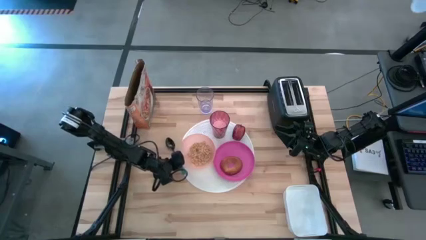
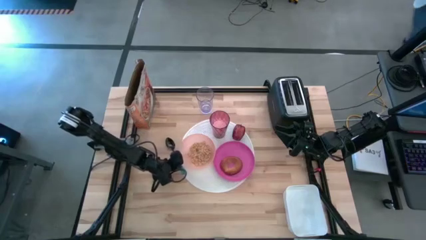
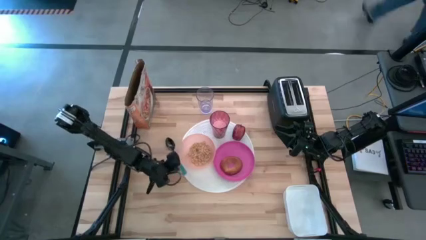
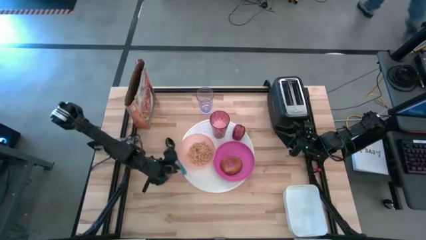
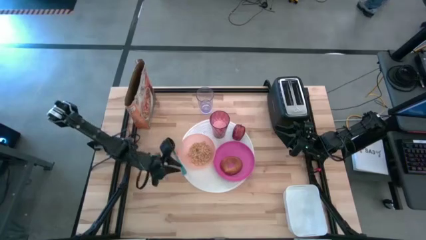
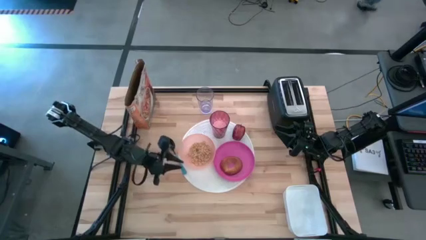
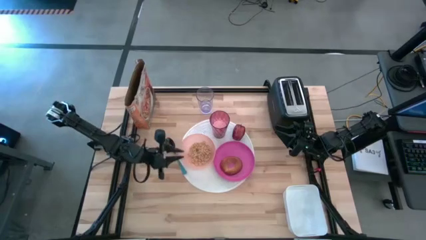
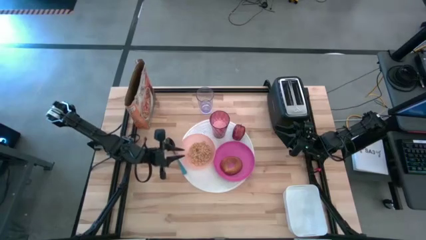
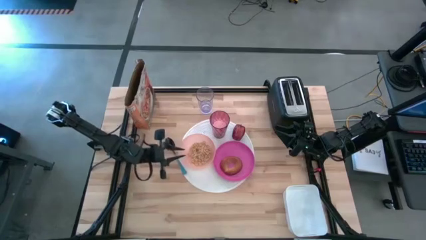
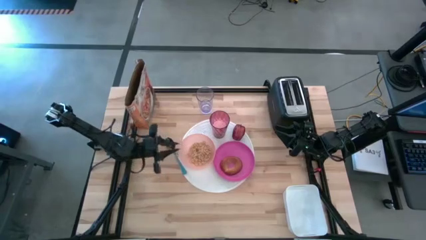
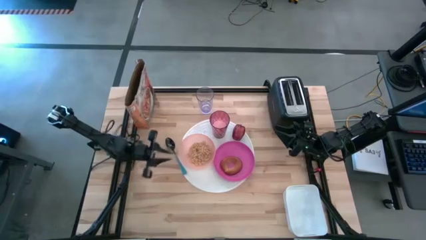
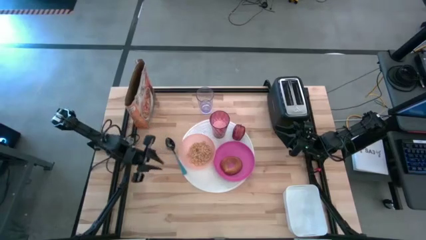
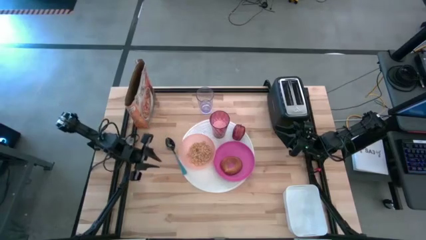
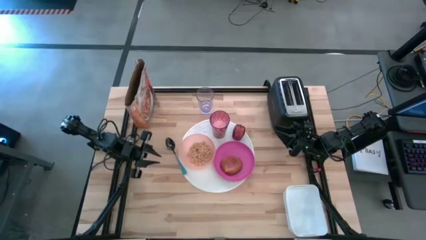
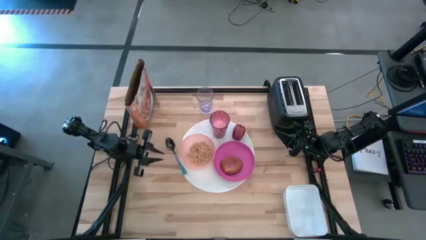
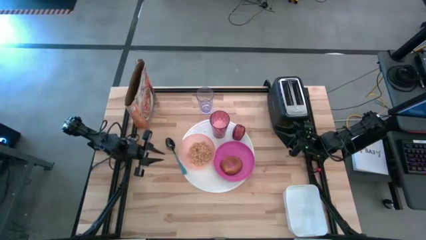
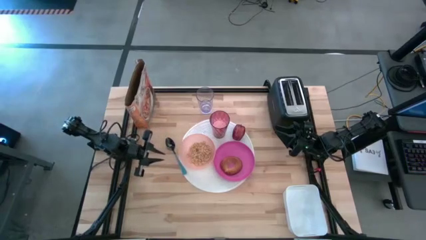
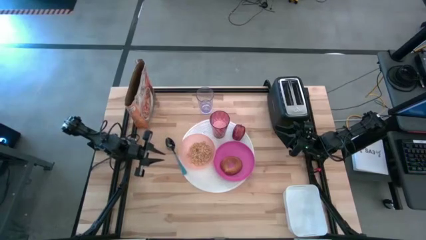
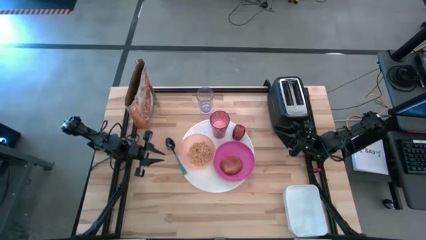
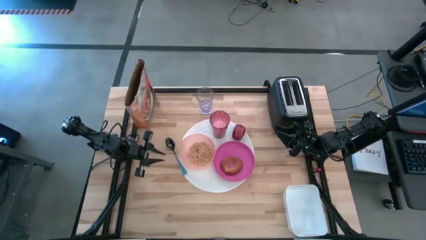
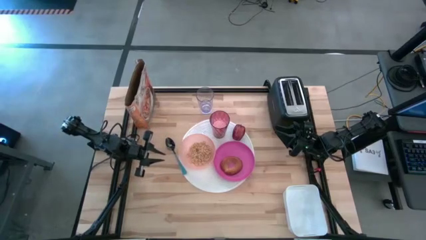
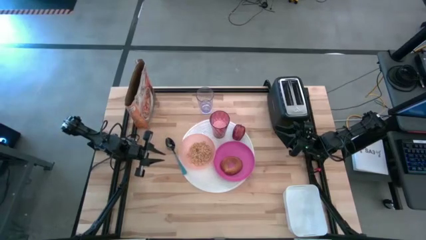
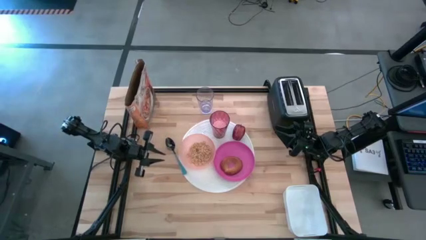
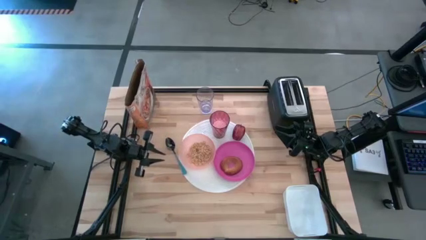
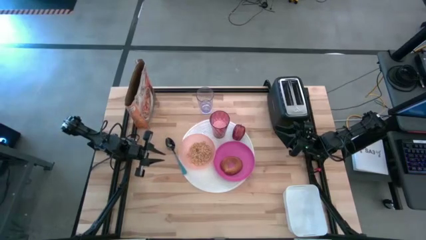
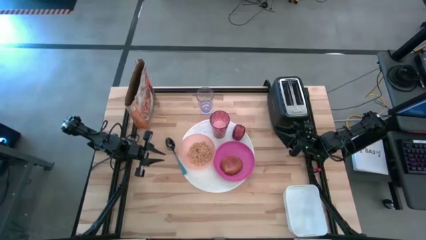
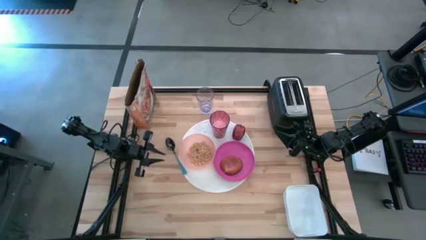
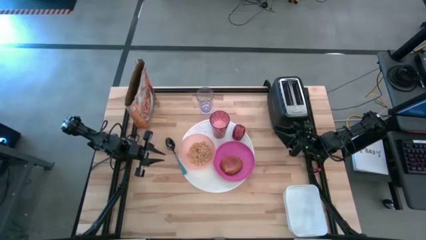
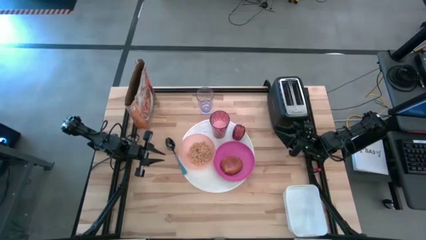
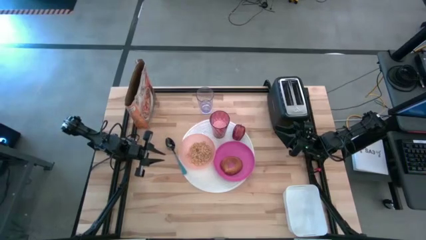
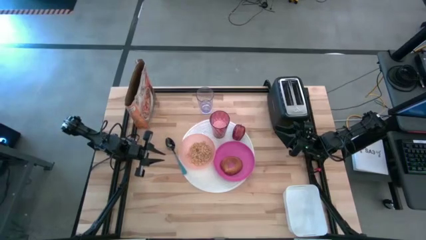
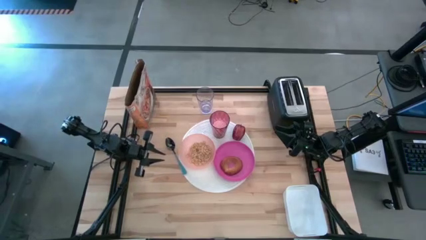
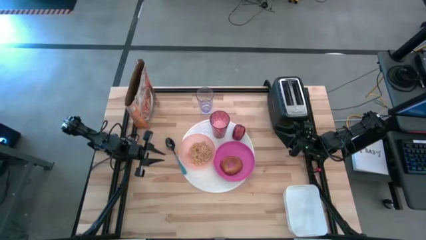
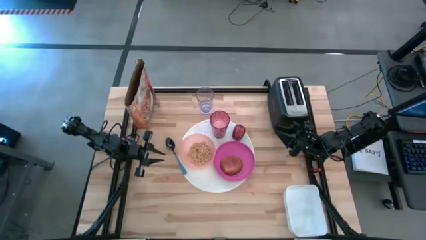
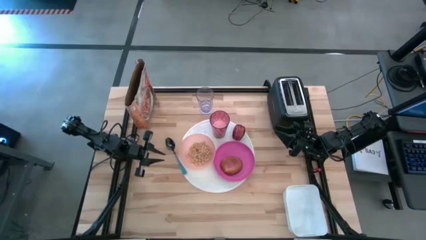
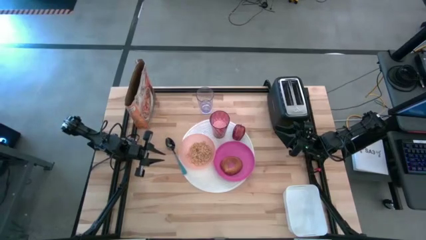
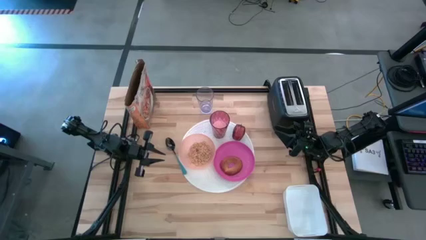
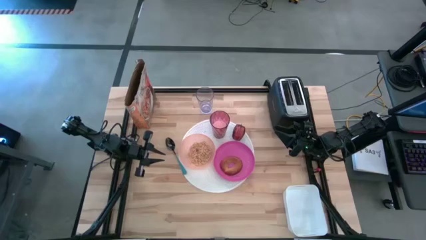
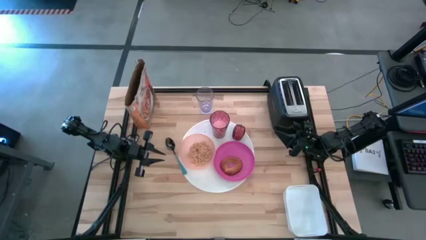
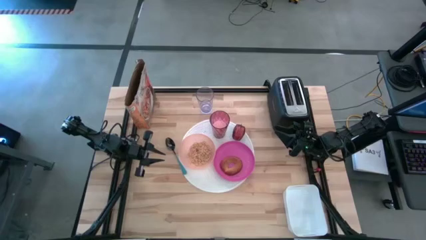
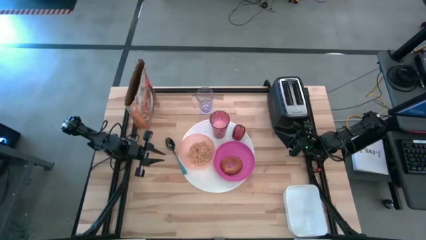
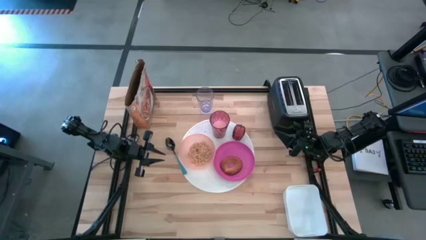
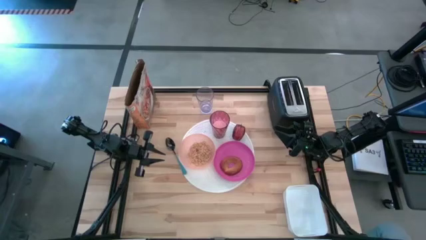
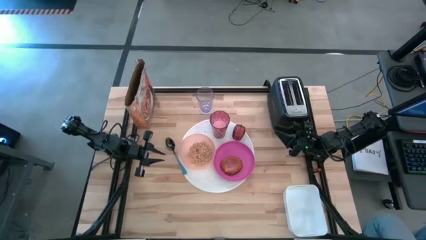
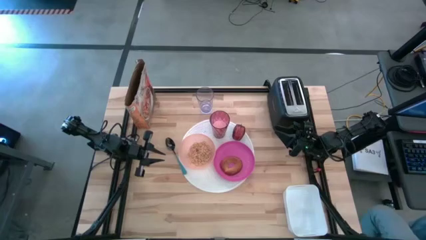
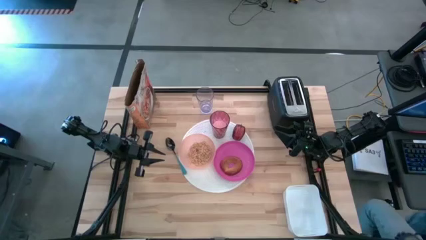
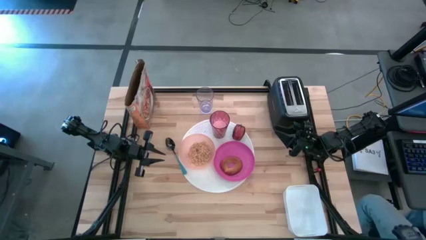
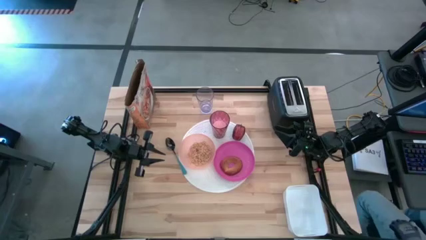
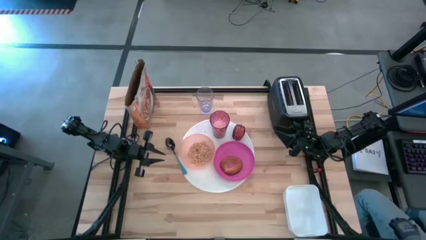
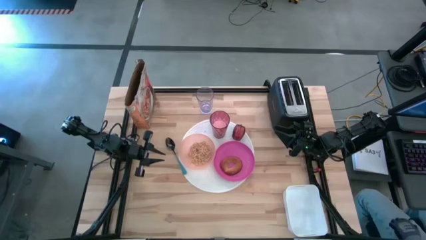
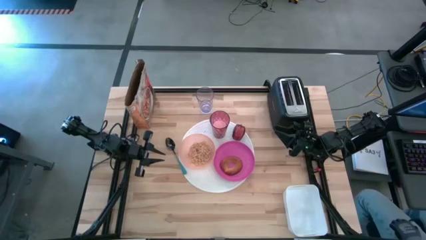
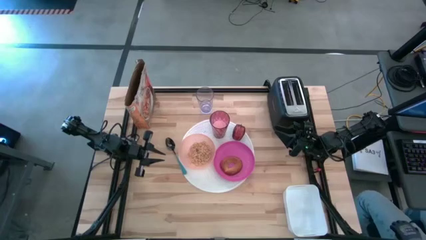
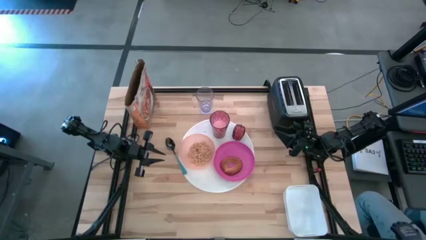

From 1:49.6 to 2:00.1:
Task: Arrange a breakfast setting
Return to Home Position

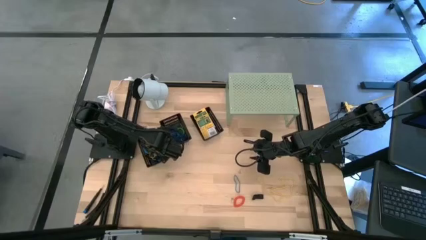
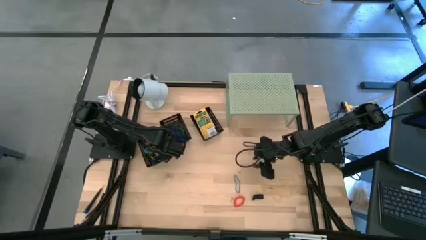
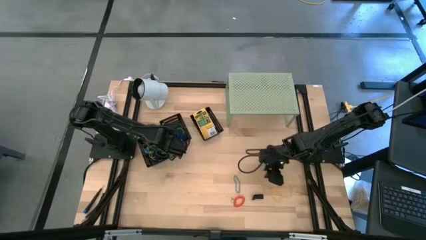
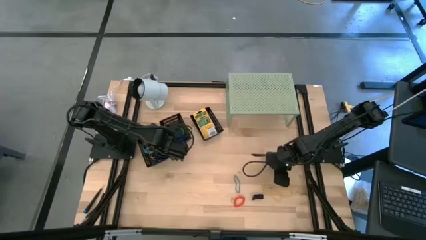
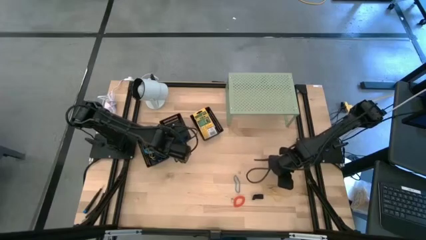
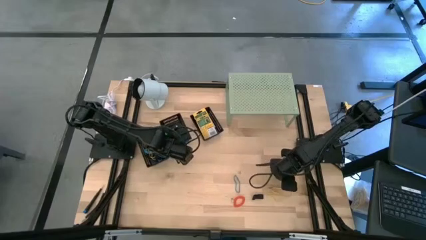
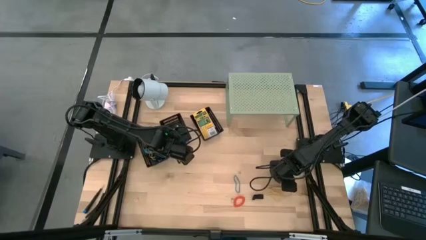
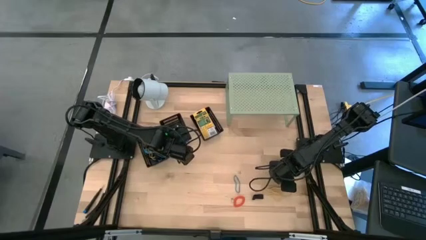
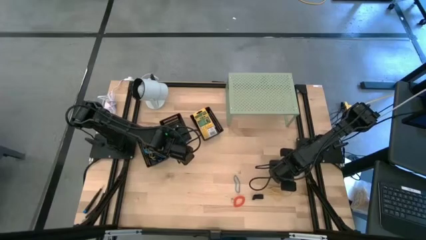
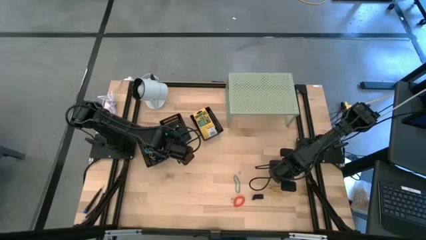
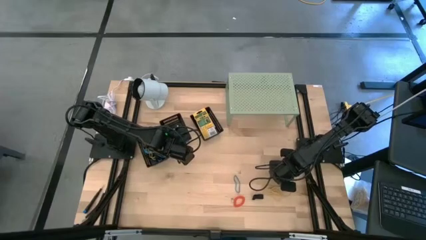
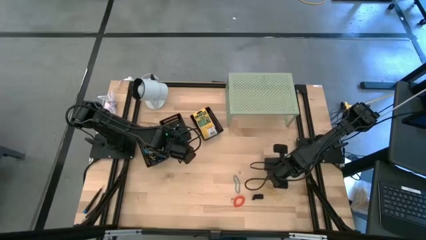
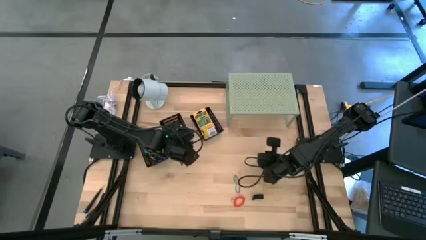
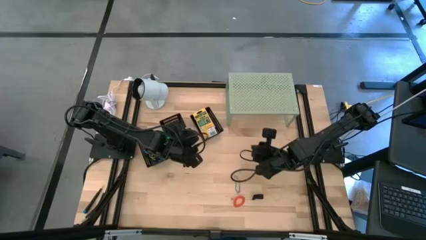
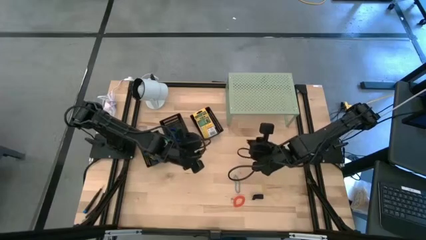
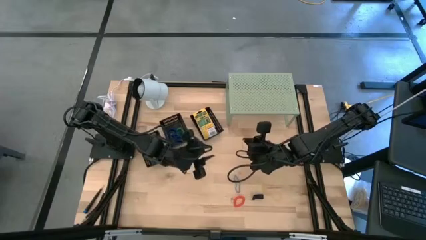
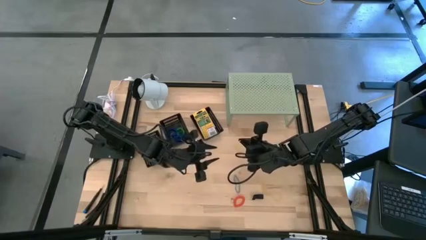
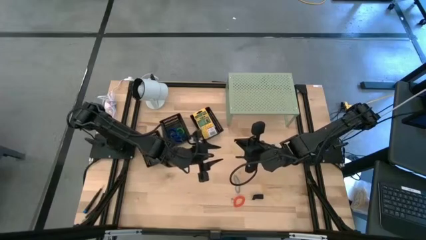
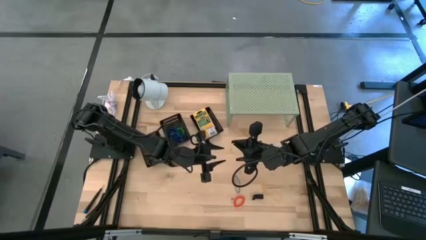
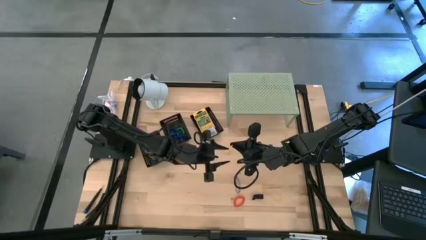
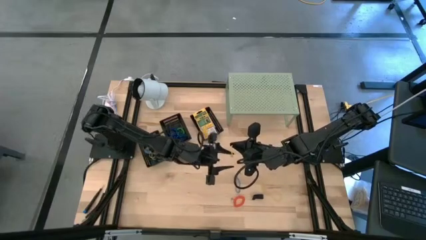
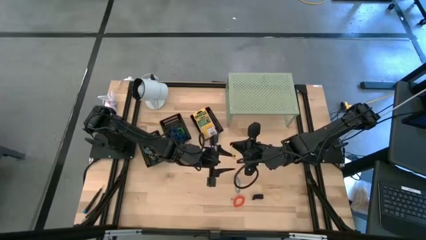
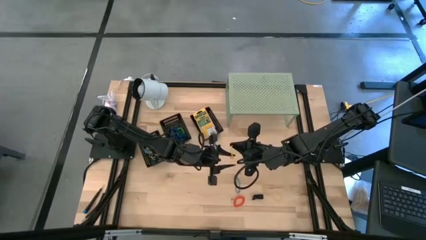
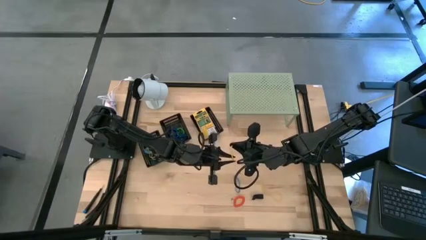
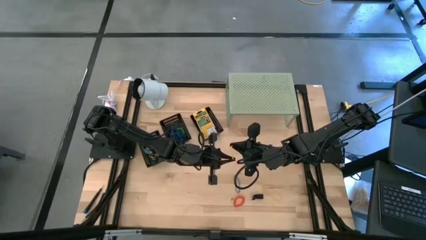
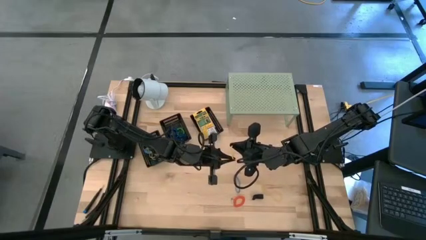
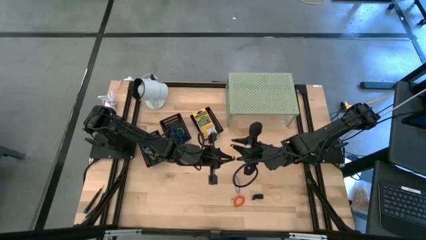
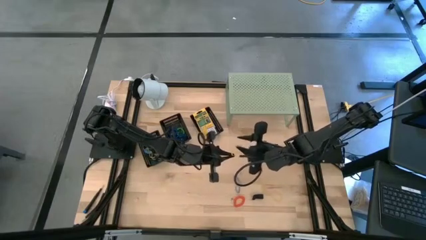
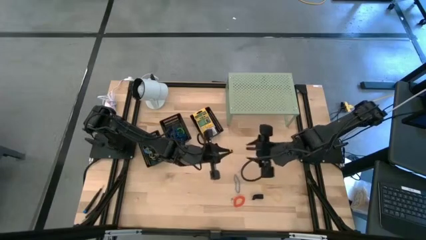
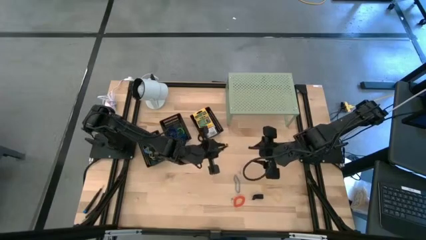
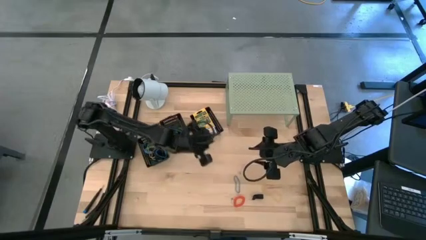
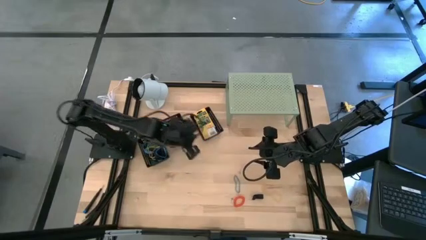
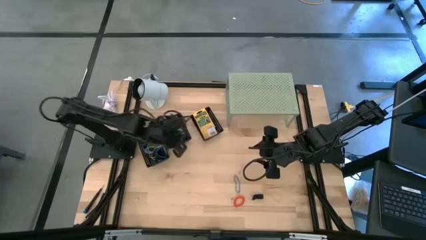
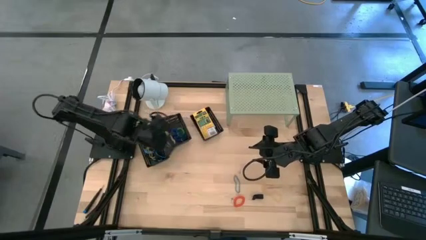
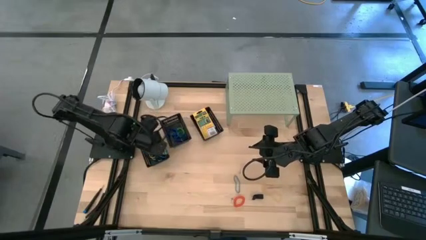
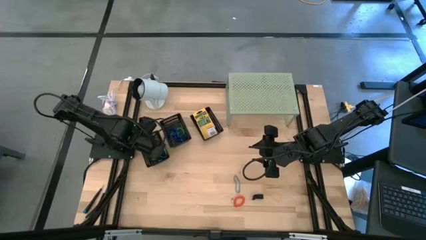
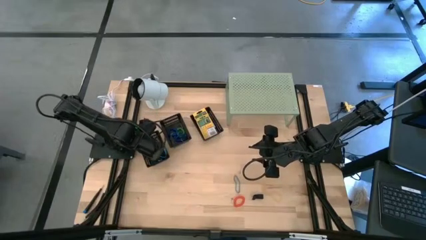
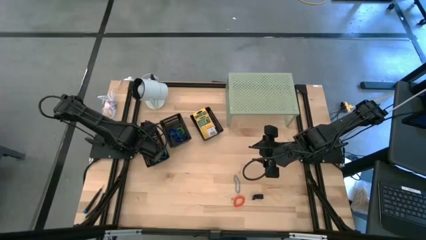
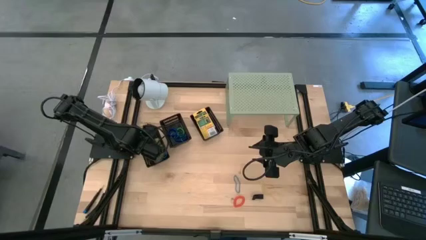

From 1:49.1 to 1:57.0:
Task: Pick & Place Office Desk Supplies
Put the yellow rubber band into the left black basket
